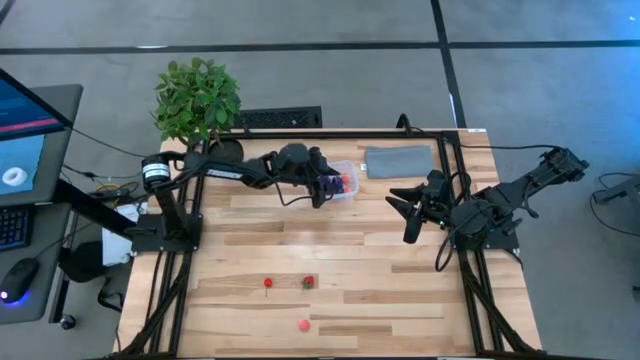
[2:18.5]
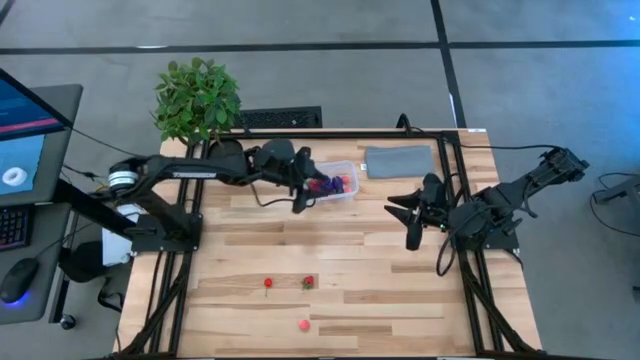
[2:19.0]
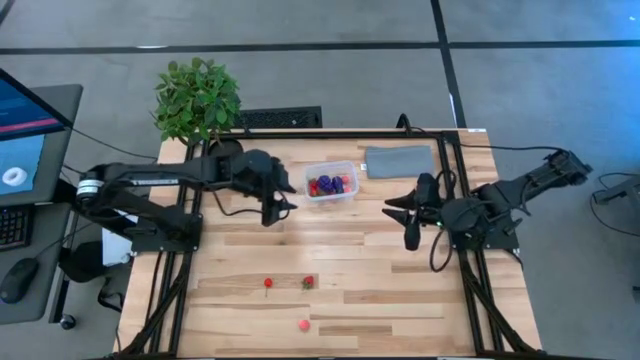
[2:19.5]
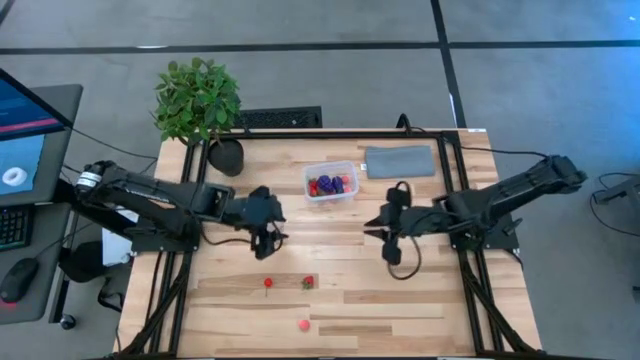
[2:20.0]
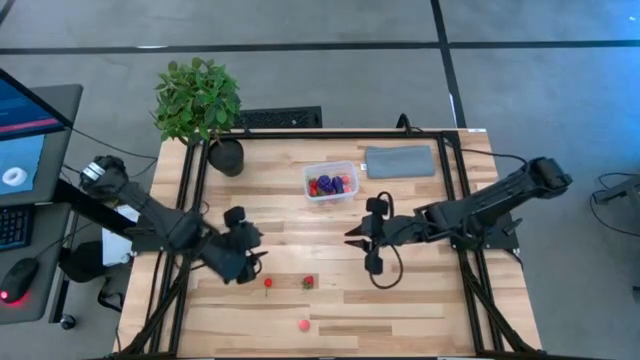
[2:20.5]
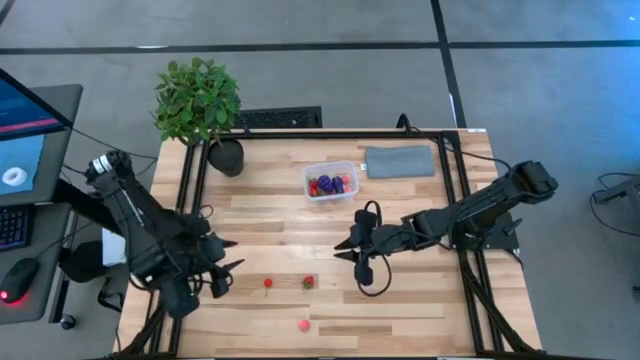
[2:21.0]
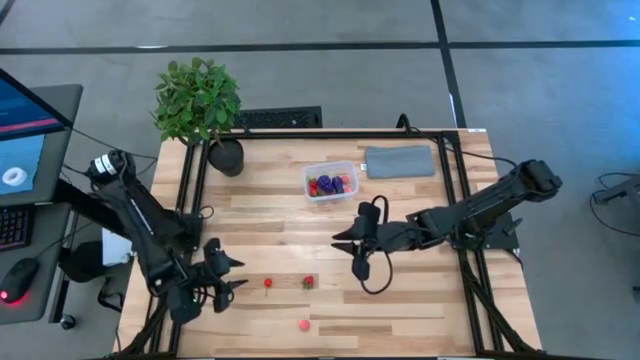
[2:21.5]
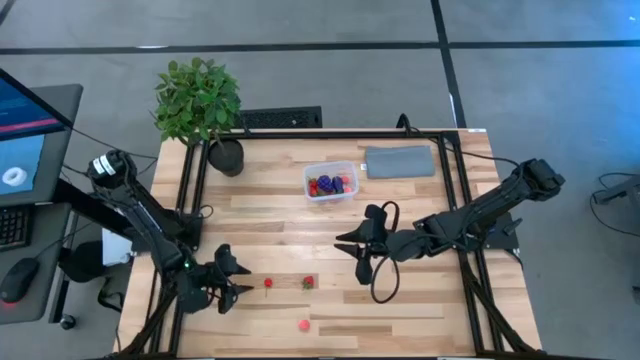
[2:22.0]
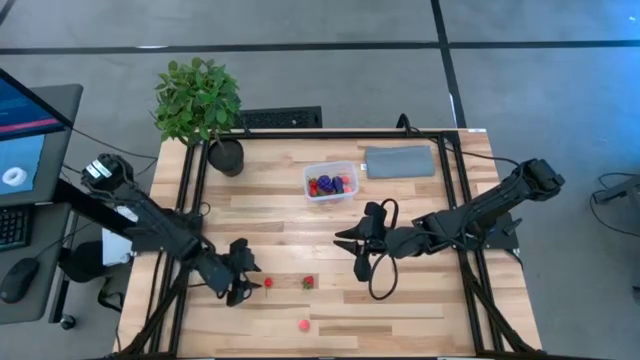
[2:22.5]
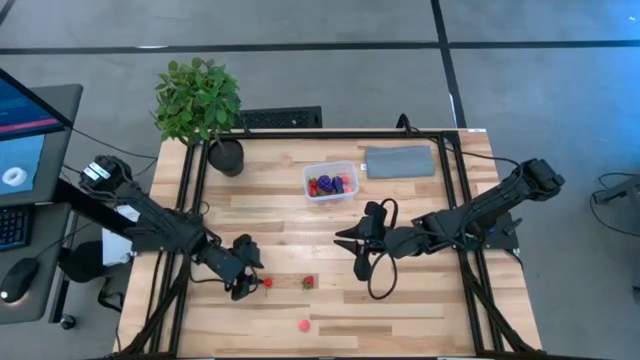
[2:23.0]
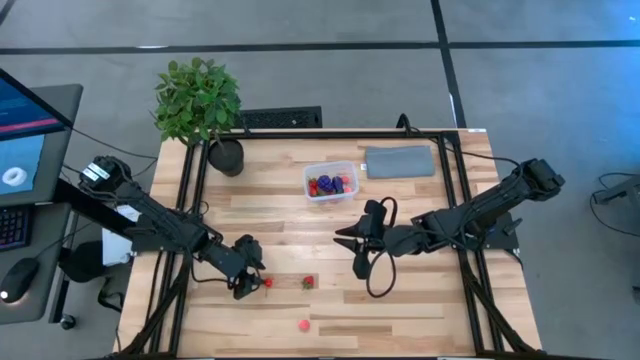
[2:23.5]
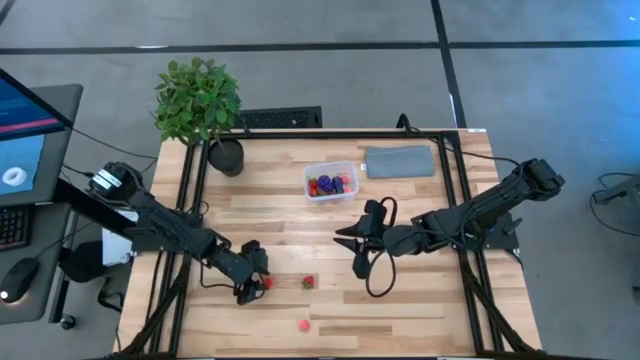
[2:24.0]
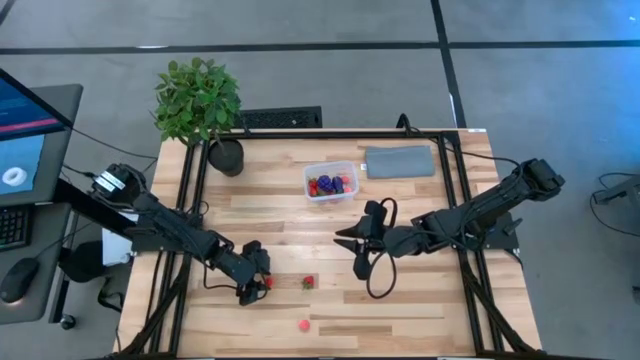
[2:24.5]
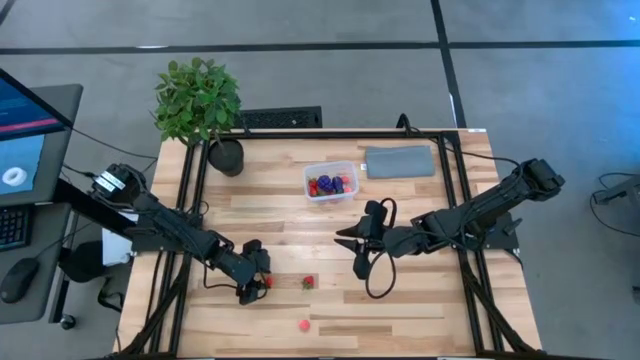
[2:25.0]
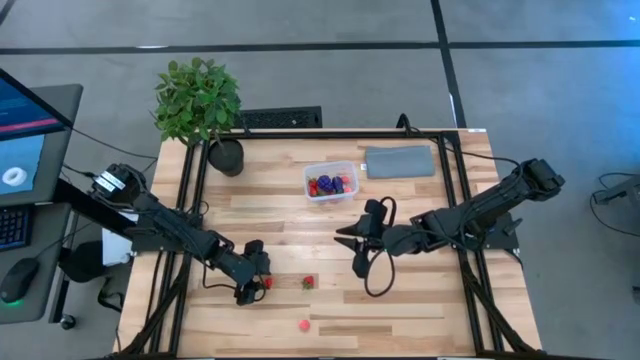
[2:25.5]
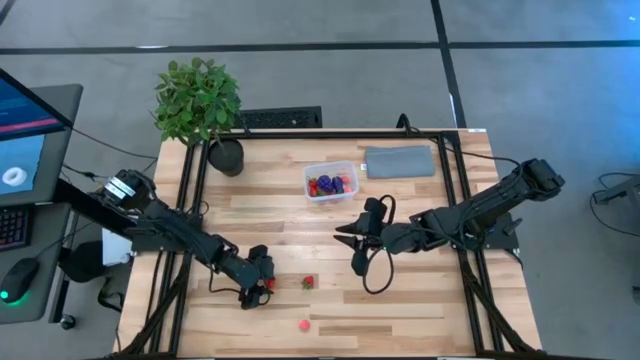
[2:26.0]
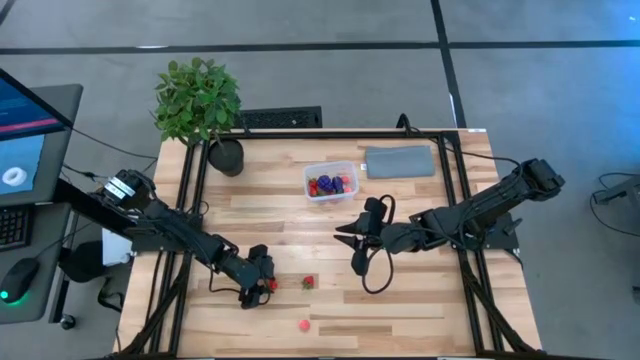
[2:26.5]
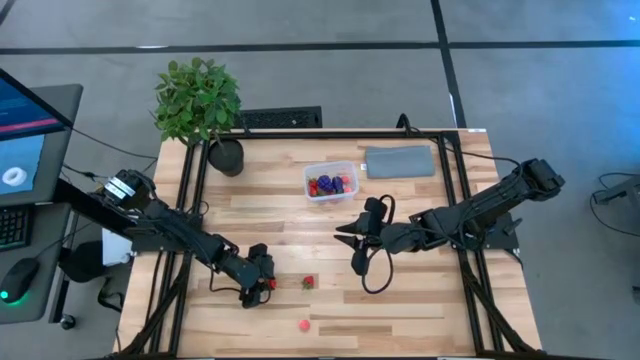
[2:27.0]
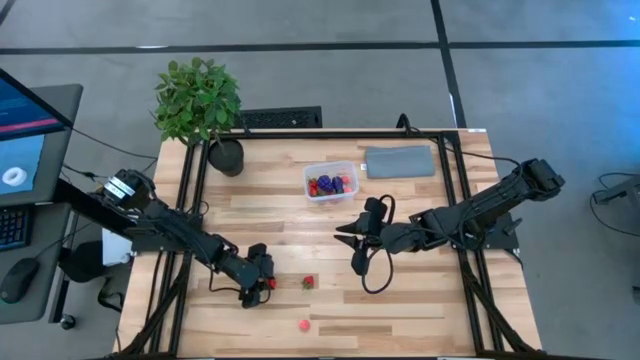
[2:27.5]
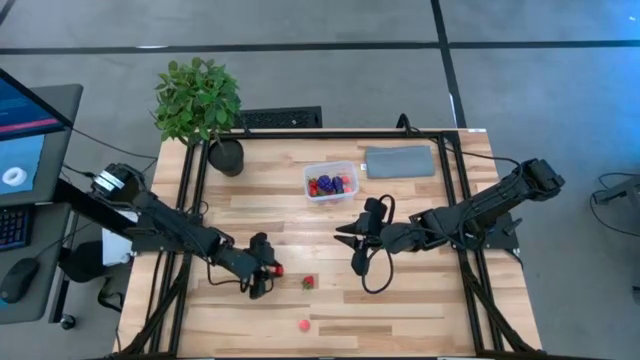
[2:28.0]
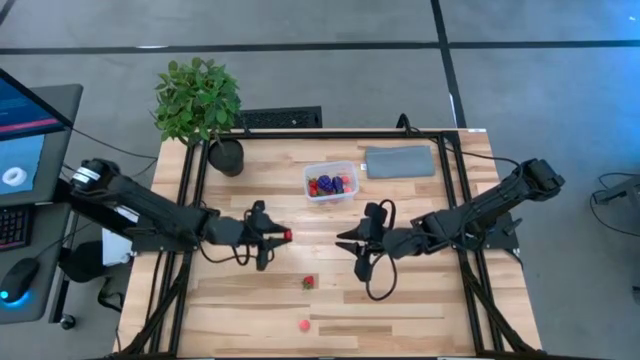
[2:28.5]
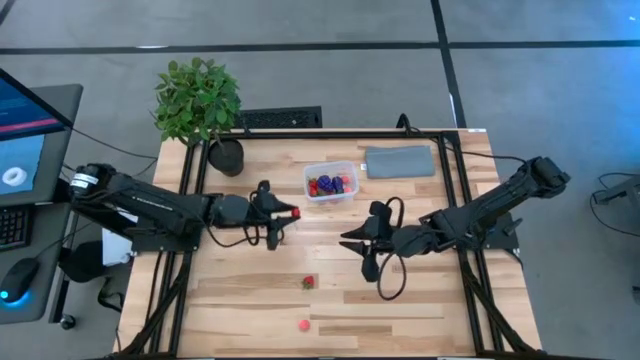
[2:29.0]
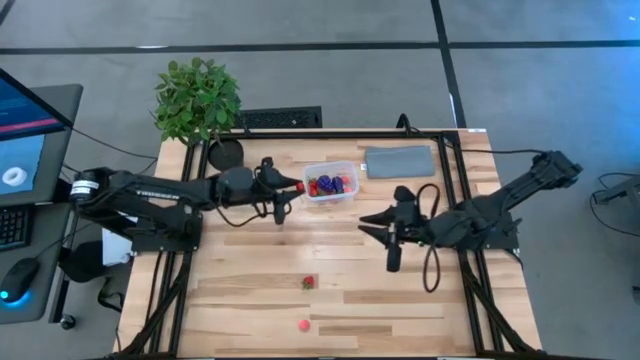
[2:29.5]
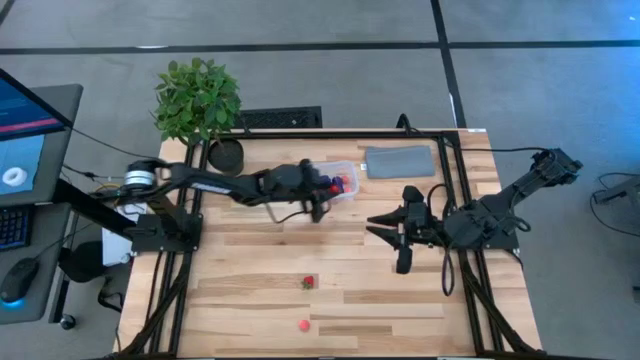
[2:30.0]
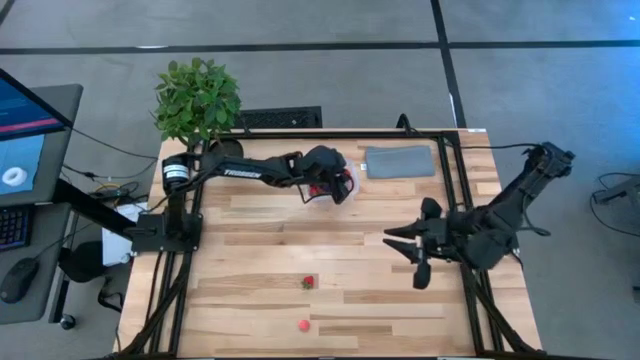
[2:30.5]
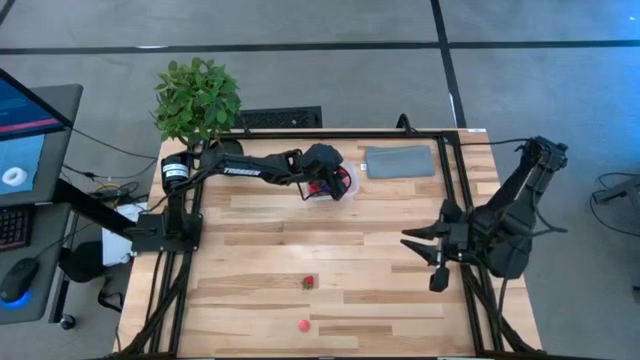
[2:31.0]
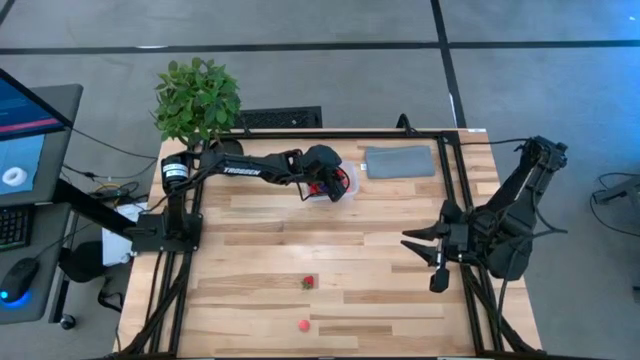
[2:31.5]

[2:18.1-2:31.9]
Task: Pick and placing Produce into tupperware
Put the cherry into the container

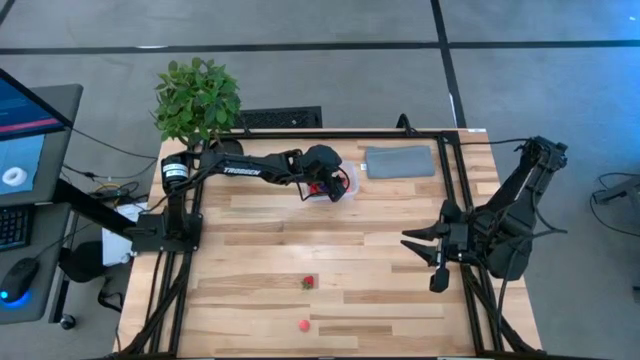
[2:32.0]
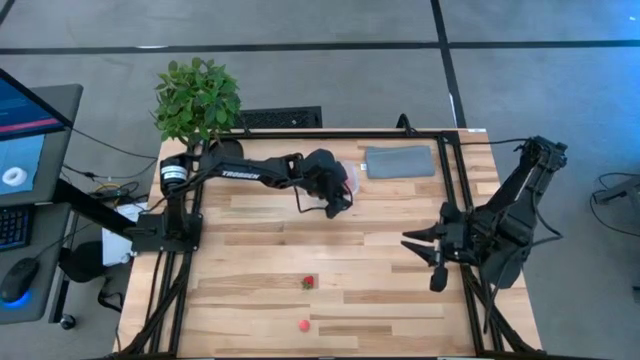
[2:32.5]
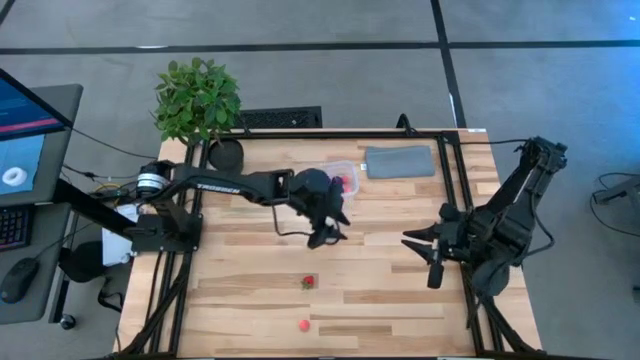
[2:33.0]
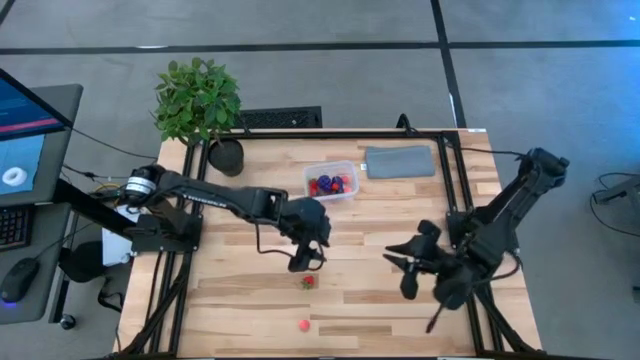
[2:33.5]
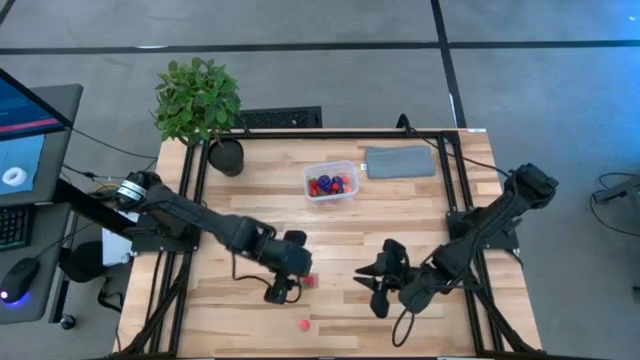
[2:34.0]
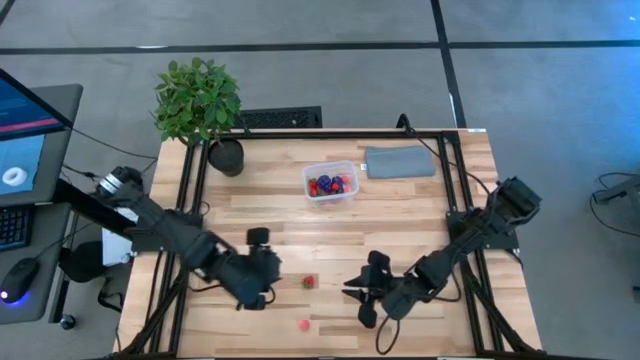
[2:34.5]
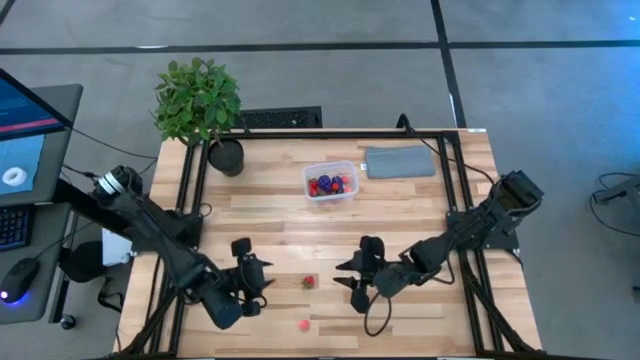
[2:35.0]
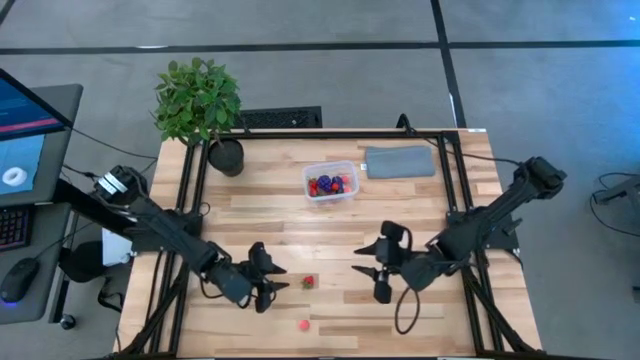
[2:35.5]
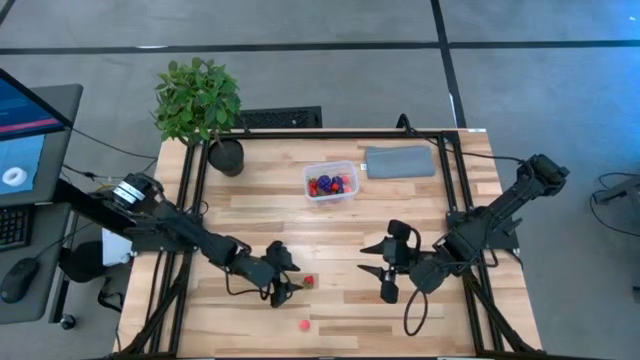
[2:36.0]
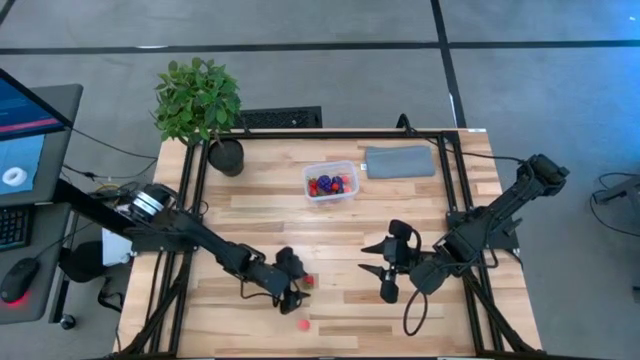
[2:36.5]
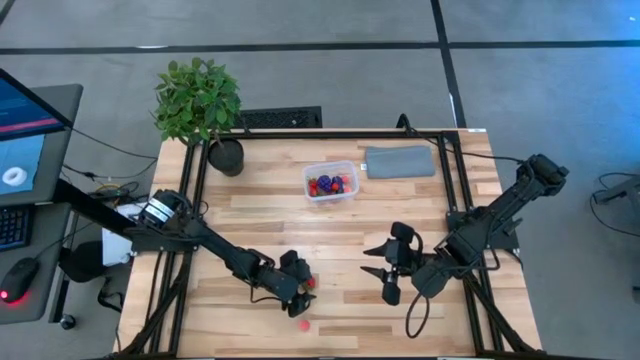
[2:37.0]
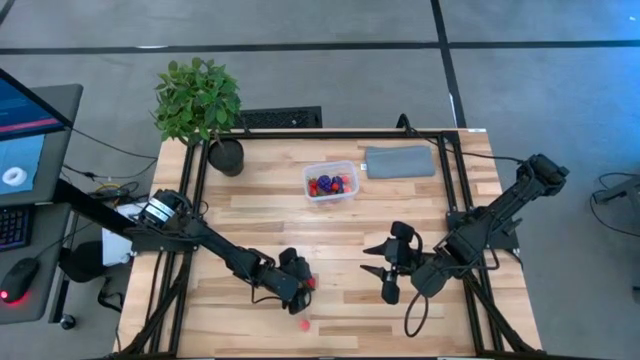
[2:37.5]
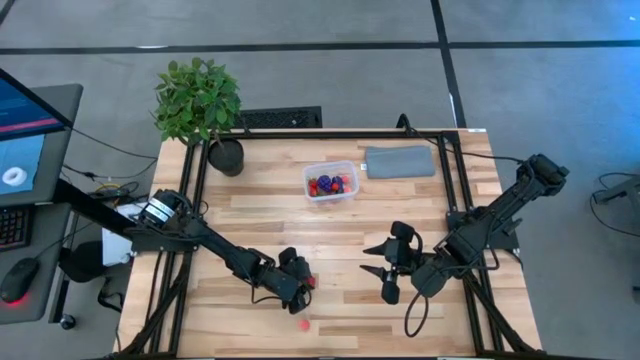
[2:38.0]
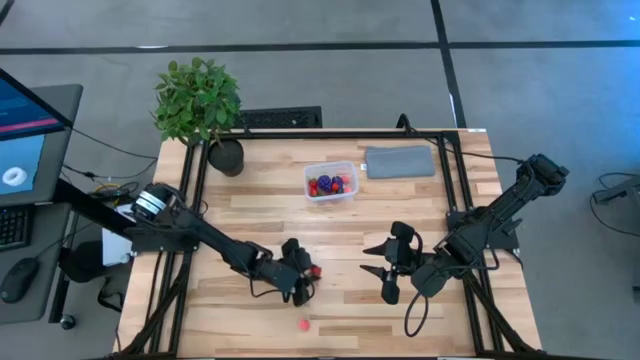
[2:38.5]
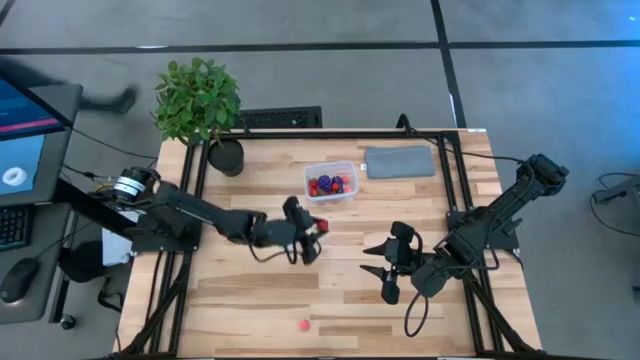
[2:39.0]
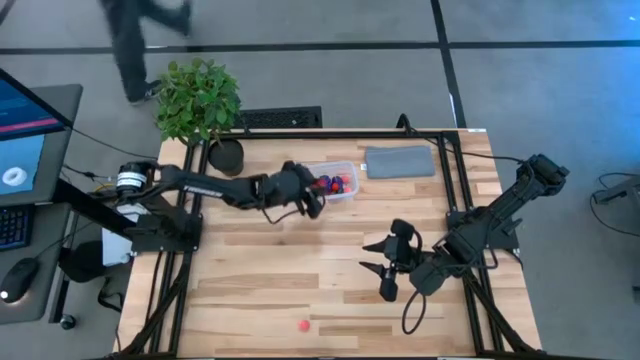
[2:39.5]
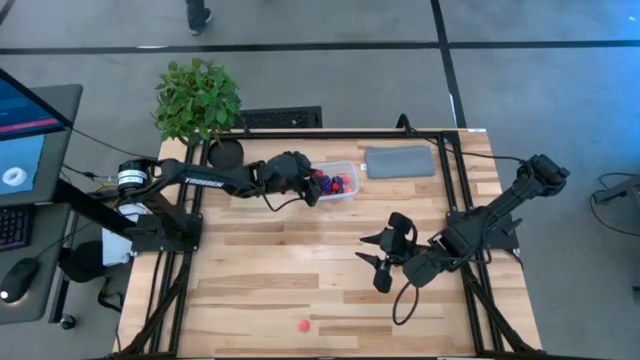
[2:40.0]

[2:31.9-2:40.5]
Put the strawberry into the container
